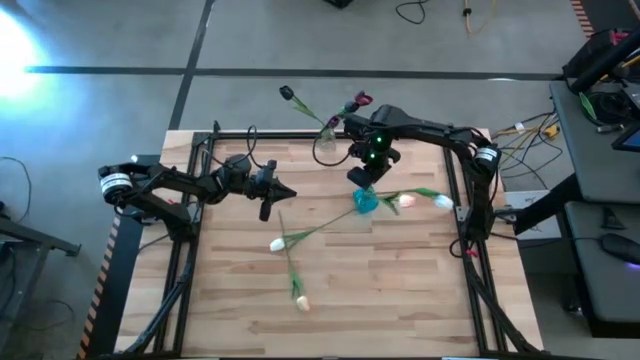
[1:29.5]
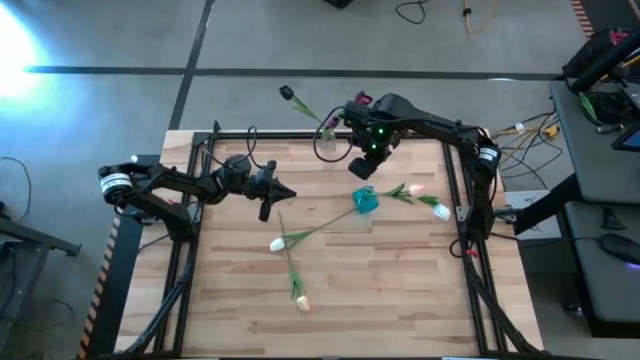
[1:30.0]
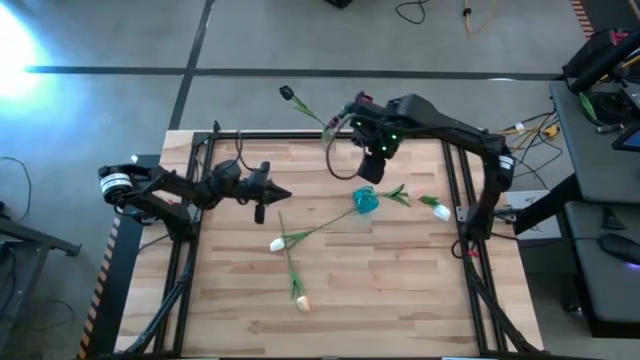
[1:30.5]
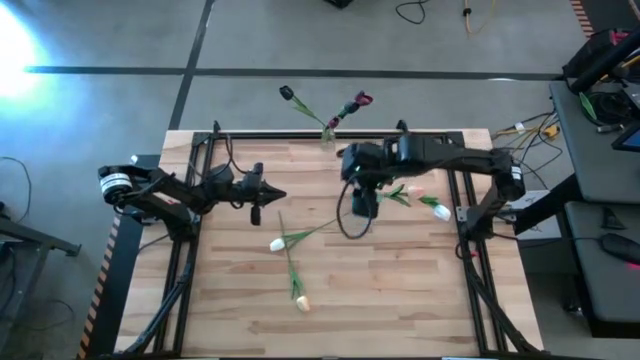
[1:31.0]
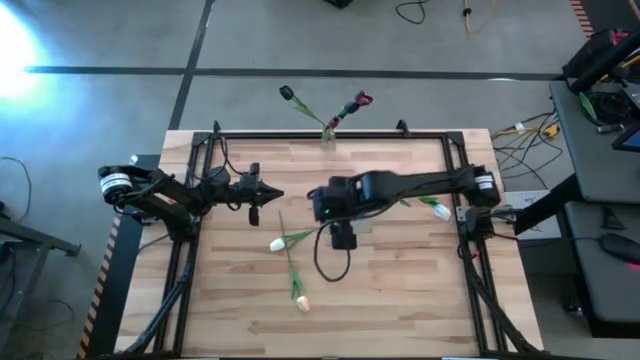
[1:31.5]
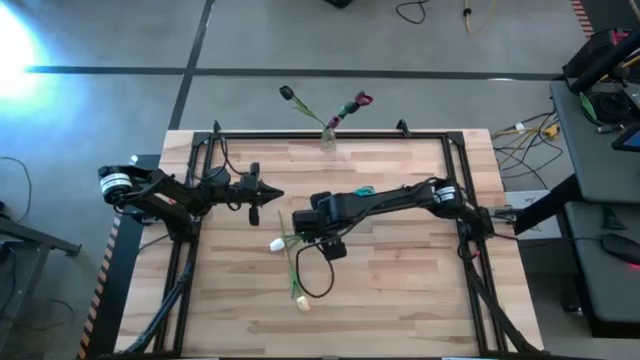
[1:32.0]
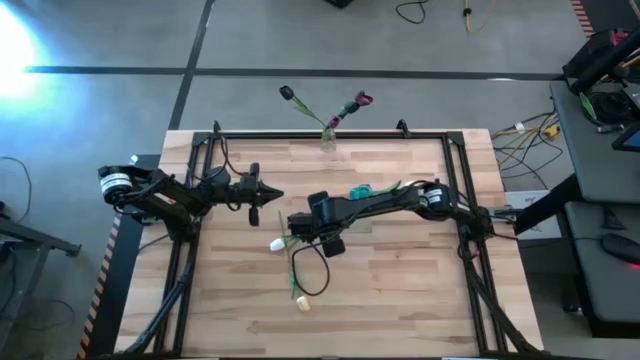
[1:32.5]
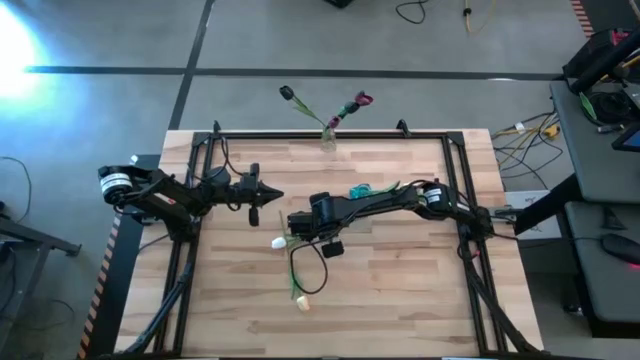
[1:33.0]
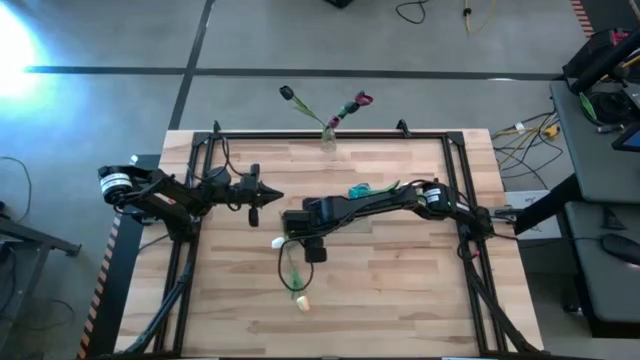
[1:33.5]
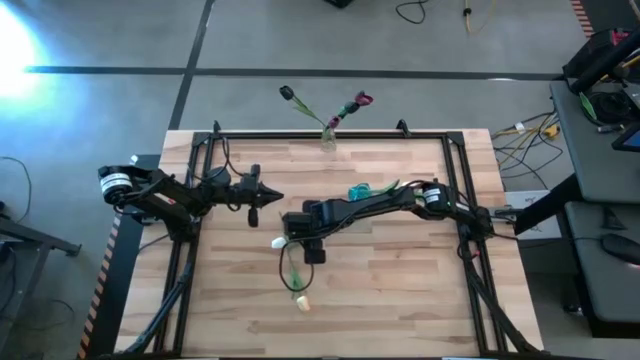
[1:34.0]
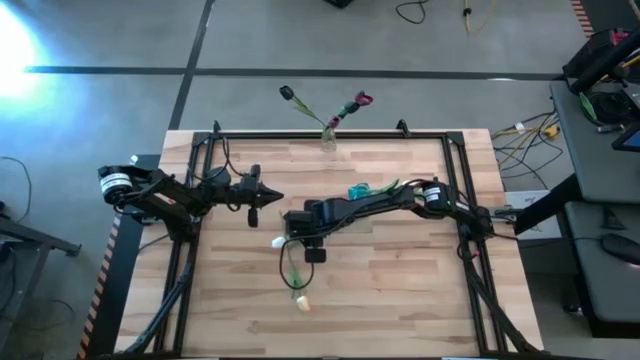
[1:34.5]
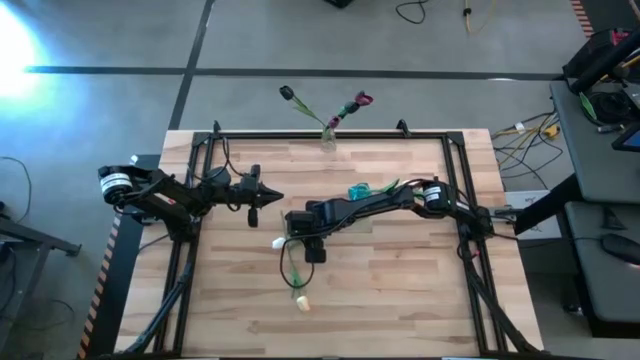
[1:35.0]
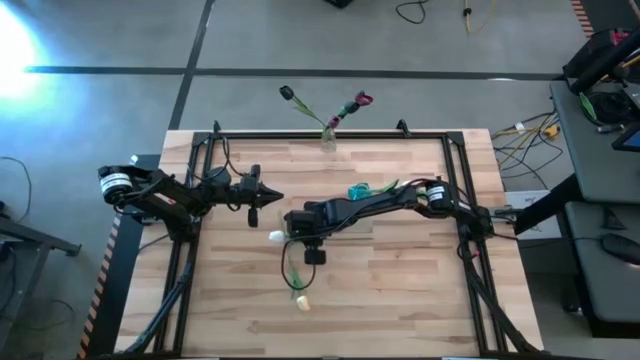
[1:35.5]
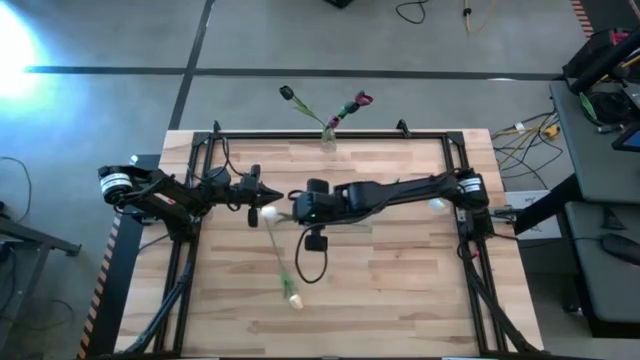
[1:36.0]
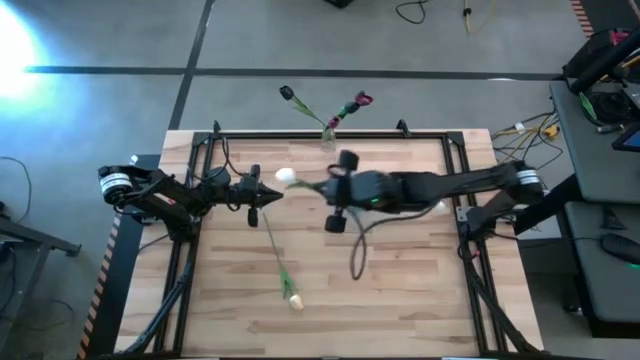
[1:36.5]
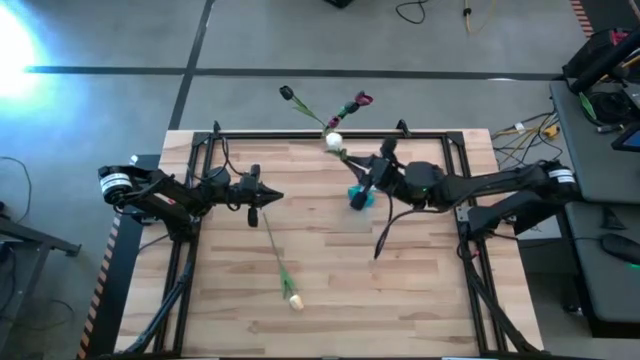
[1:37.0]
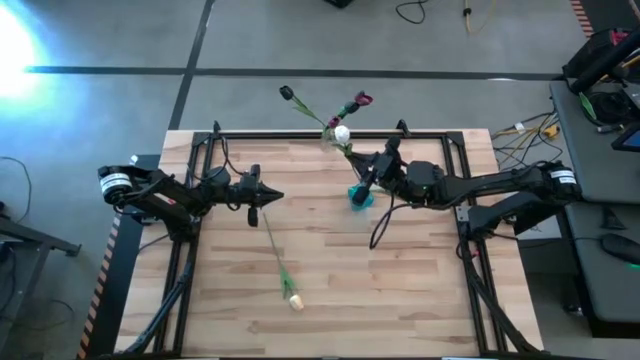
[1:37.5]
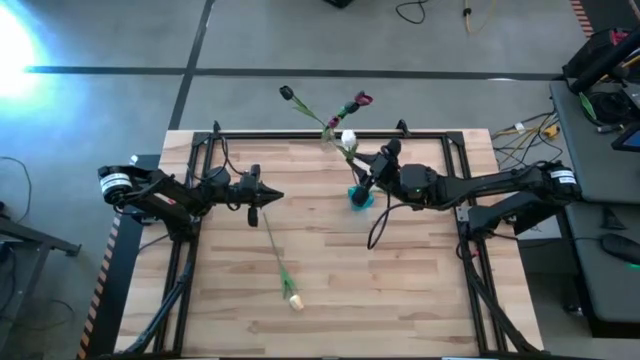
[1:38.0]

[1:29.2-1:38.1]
Task: Sort flowers into vase by color
Put the white tulip into the blue vase

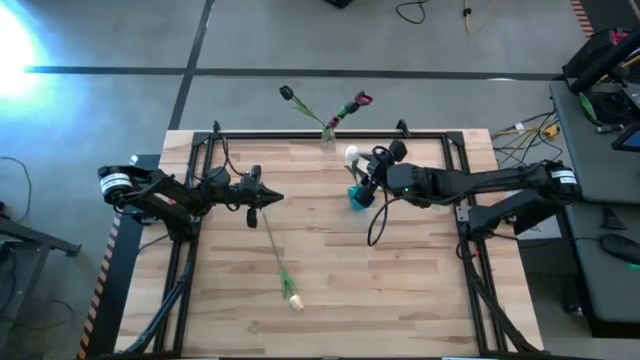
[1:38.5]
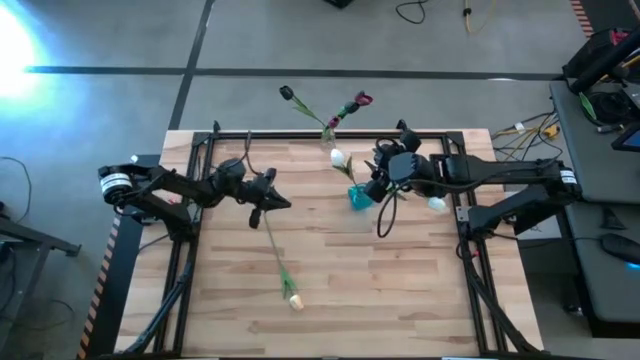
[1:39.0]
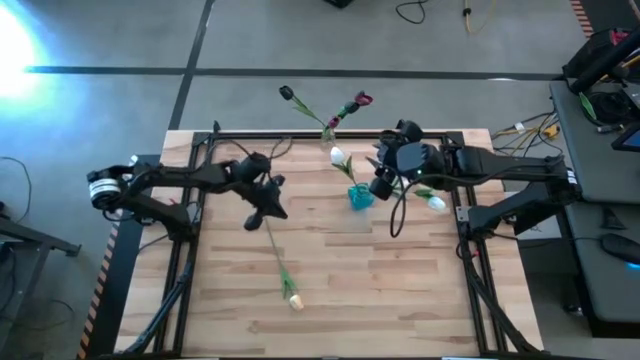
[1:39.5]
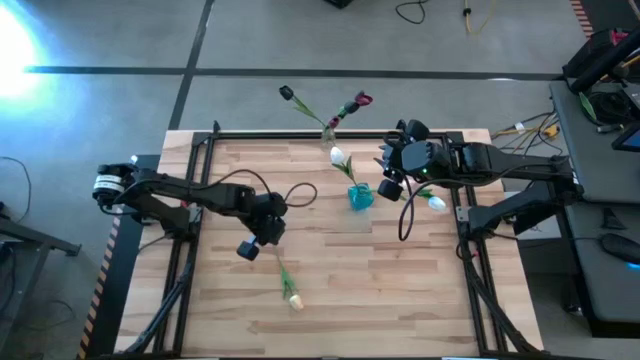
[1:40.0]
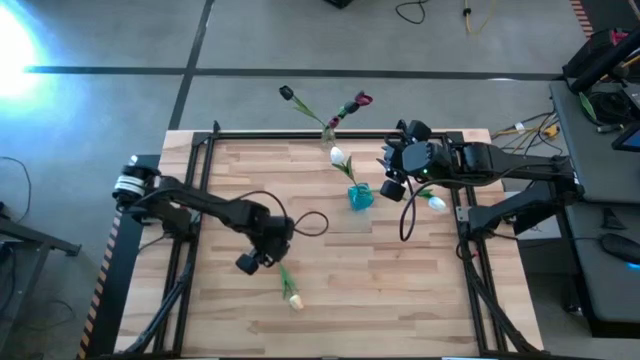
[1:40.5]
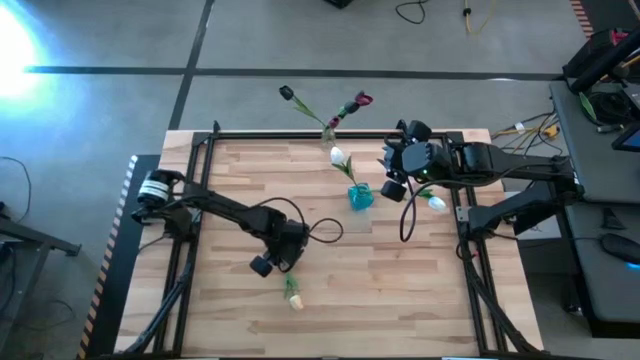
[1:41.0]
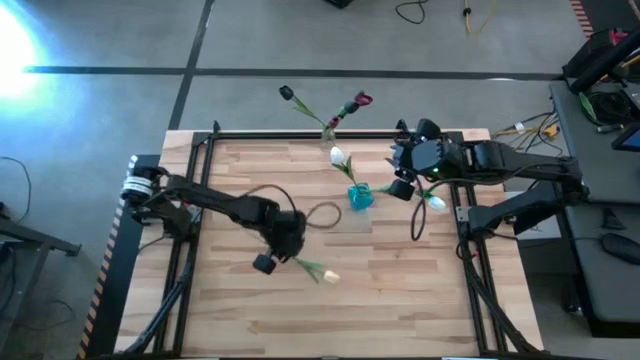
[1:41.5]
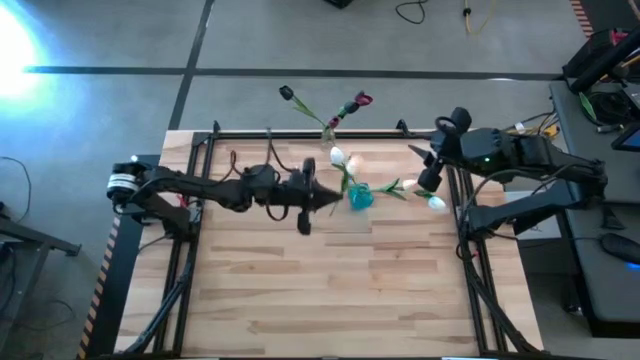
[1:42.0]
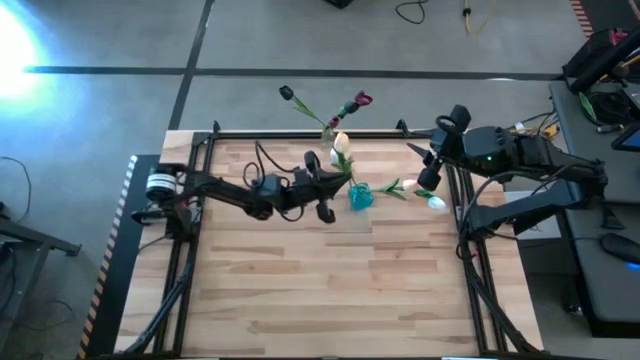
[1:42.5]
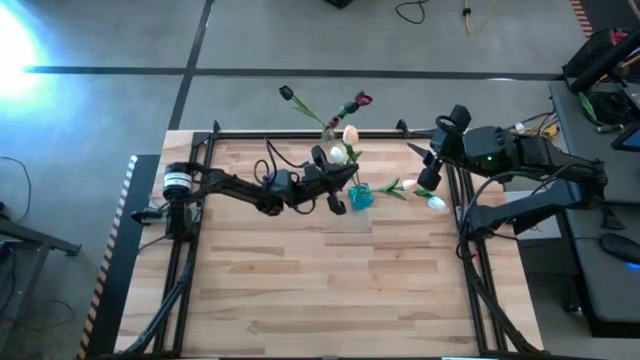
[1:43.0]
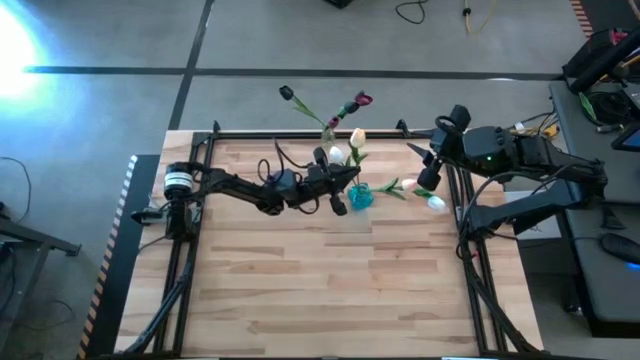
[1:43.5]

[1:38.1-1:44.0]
Put the orange tulip into the blue vase

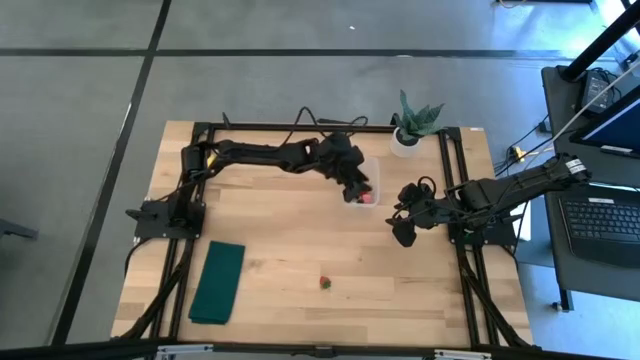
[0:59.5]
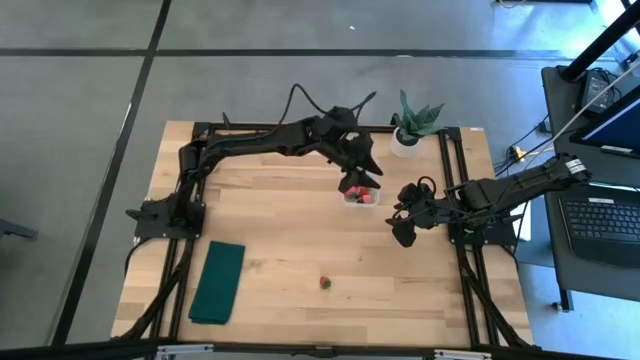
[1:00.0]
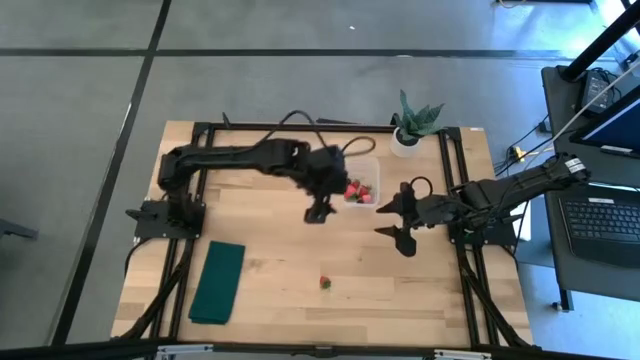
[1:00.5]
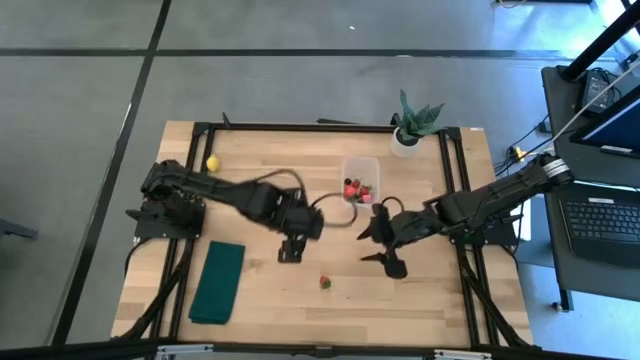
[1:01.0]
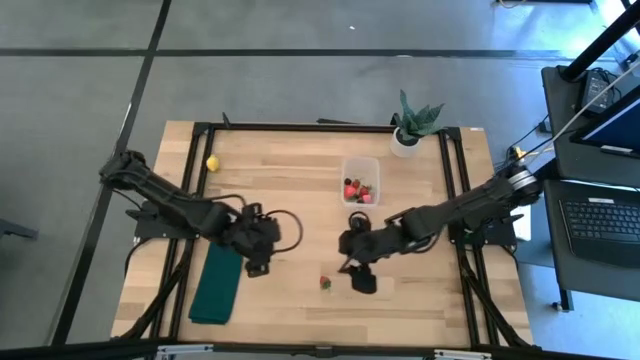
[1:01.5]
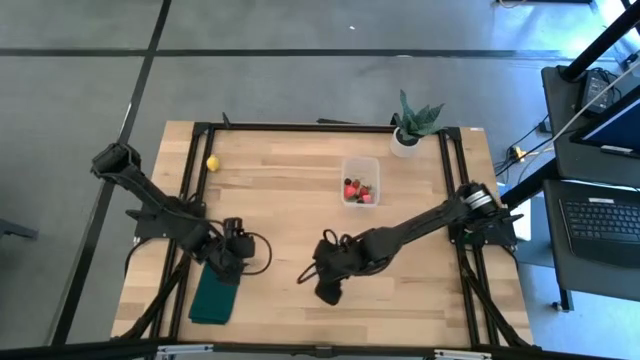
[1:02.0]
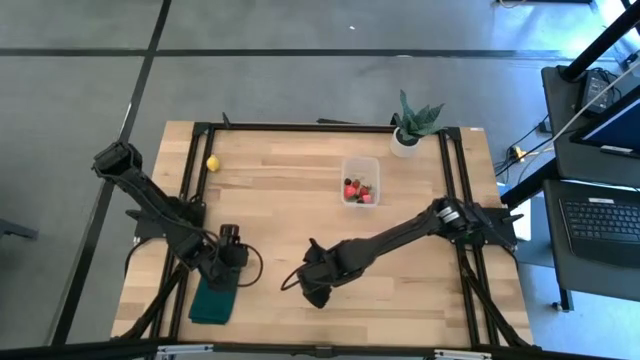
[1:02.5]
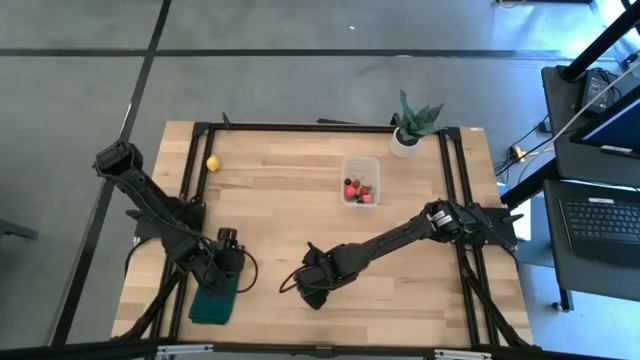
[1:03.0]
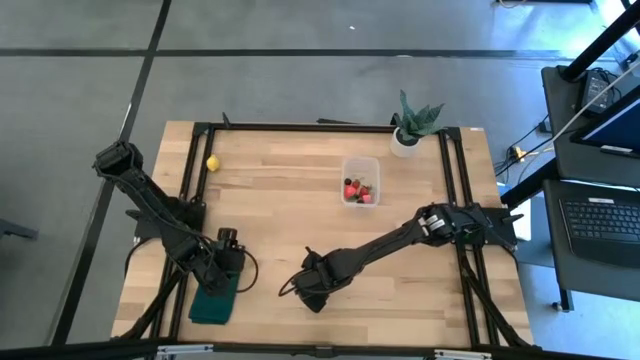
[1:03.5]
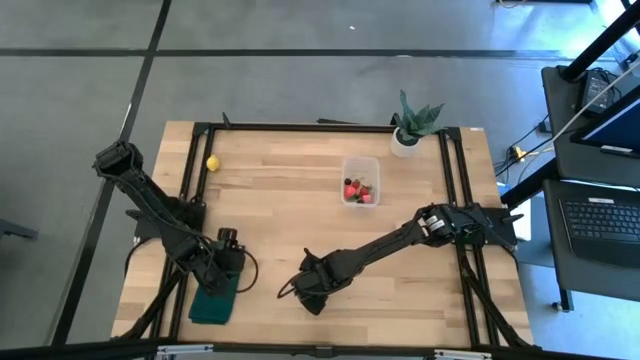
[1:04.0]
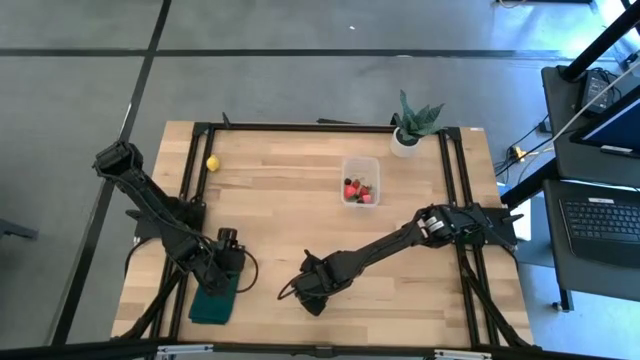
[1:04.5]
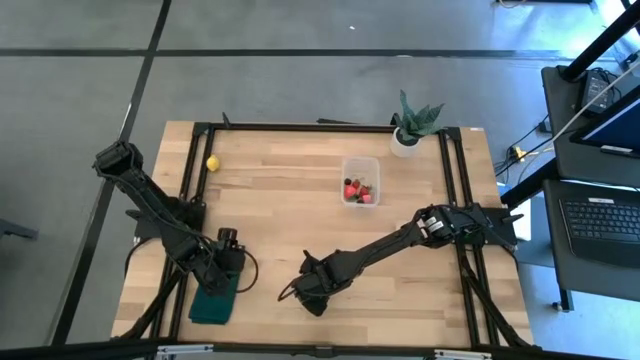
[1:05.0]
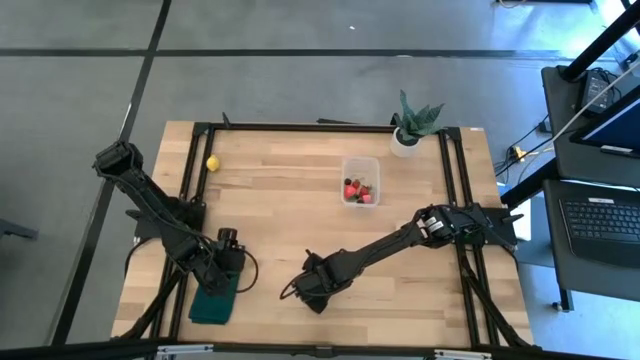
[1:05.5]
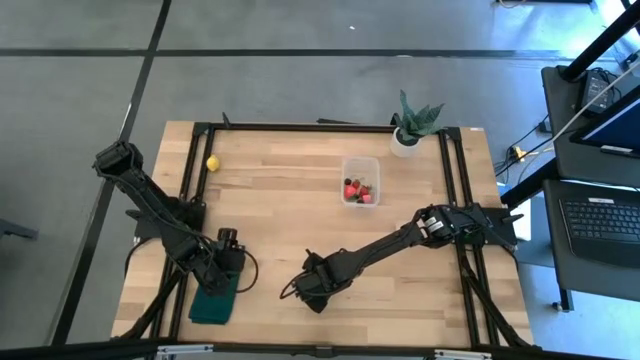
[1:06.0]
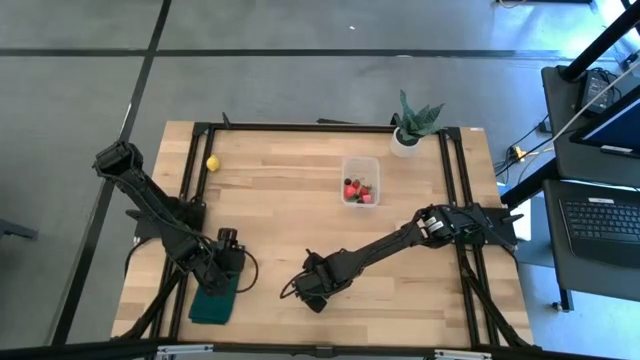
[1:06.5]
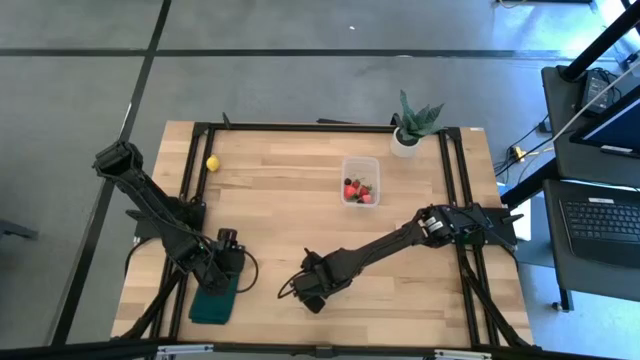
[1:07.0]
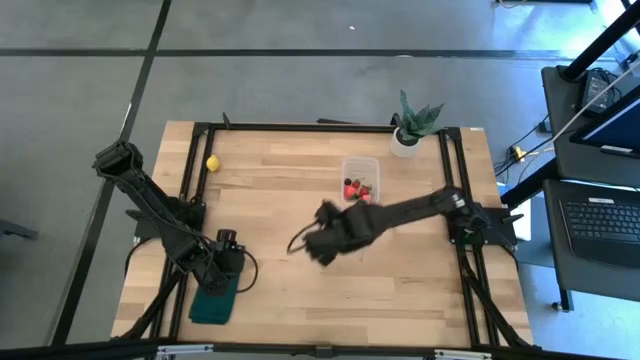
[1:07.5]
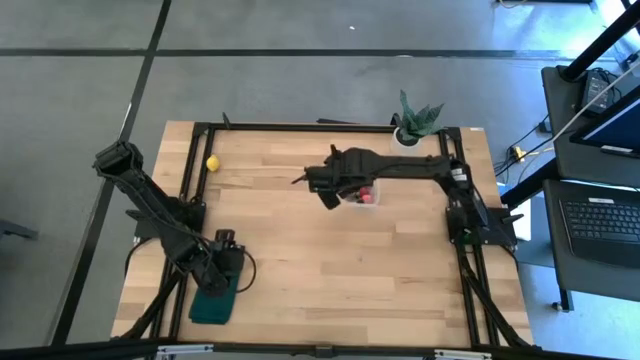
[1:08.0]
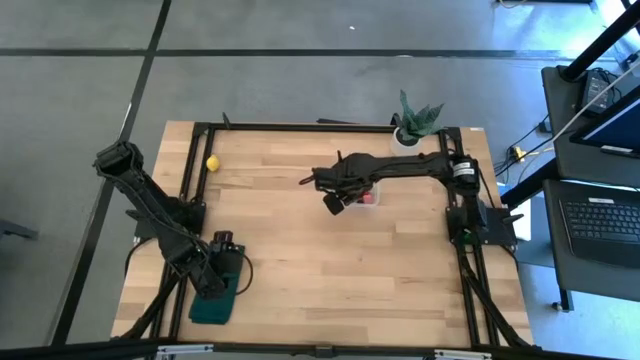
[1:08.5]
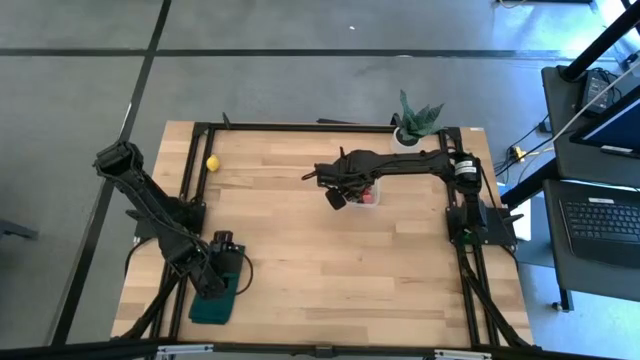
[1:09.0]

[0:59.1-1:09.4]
Task: Pick and placing Produce into tupperware
Put the red strawberry into the transparent container
